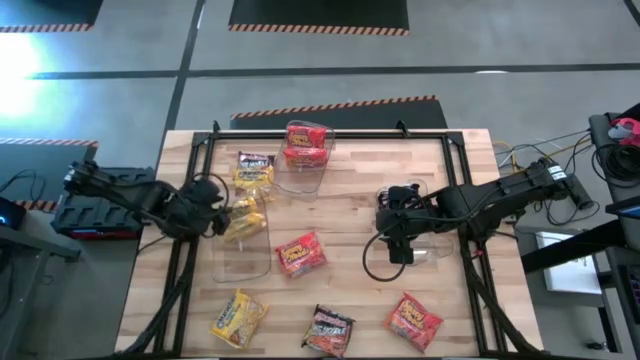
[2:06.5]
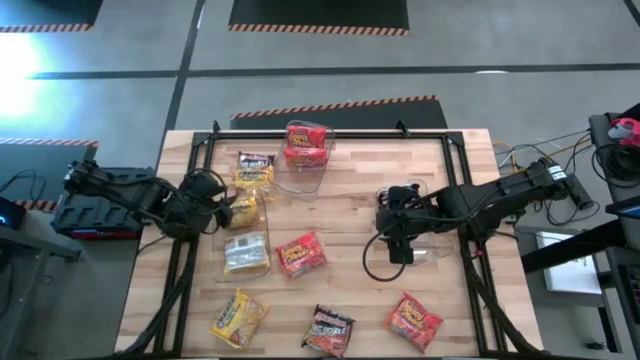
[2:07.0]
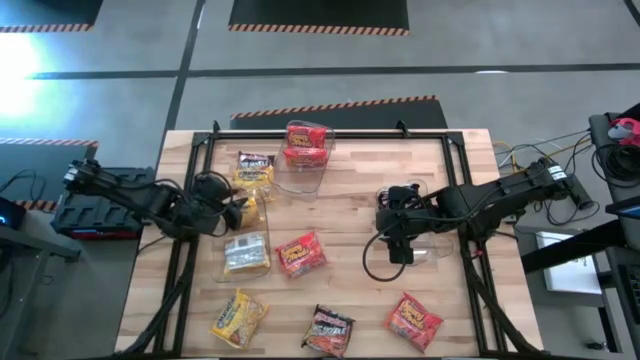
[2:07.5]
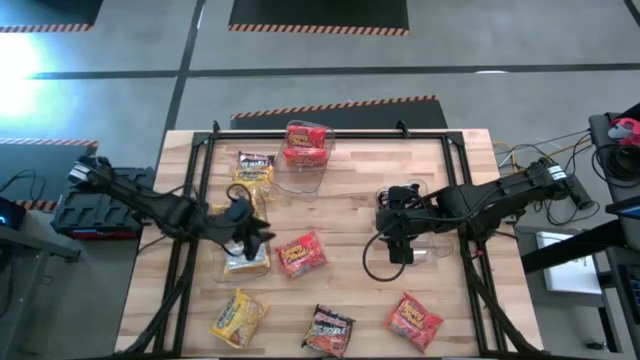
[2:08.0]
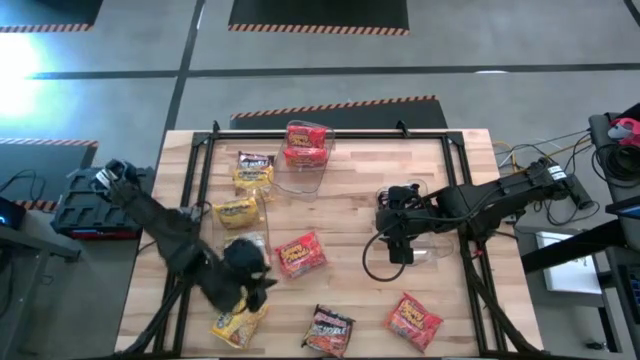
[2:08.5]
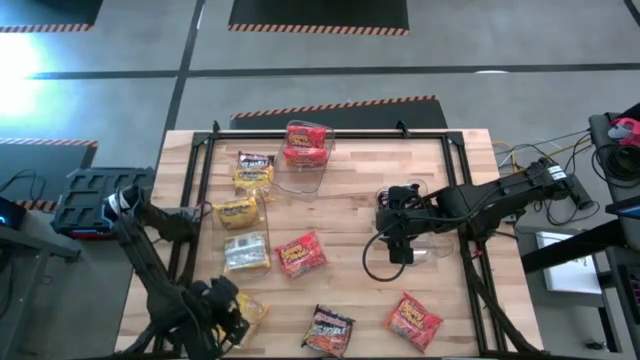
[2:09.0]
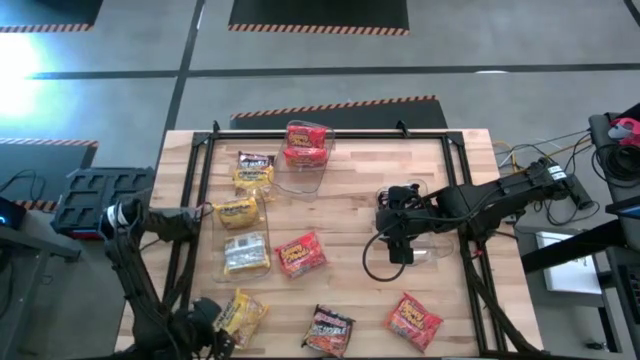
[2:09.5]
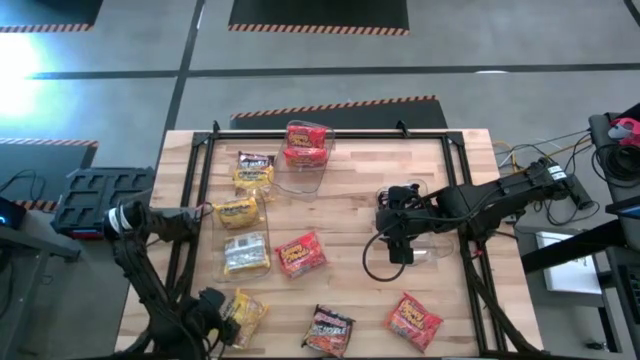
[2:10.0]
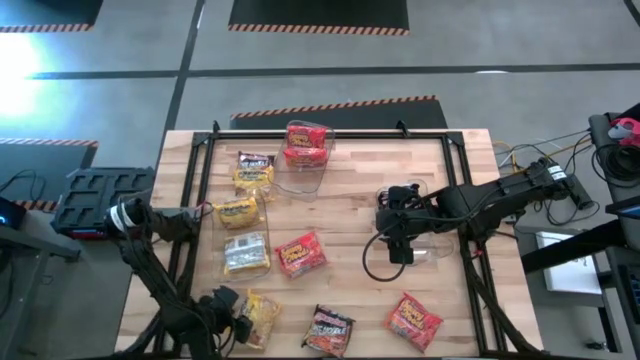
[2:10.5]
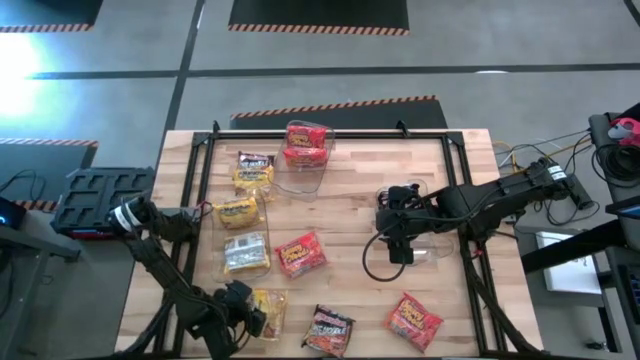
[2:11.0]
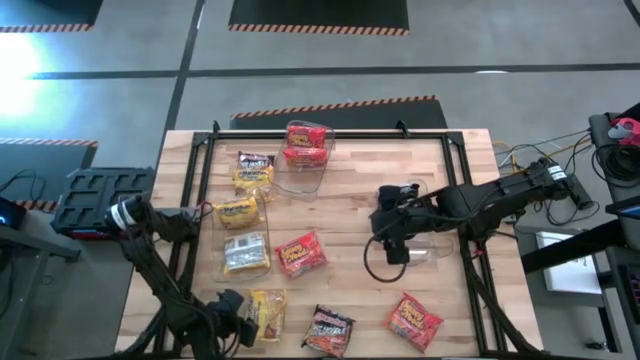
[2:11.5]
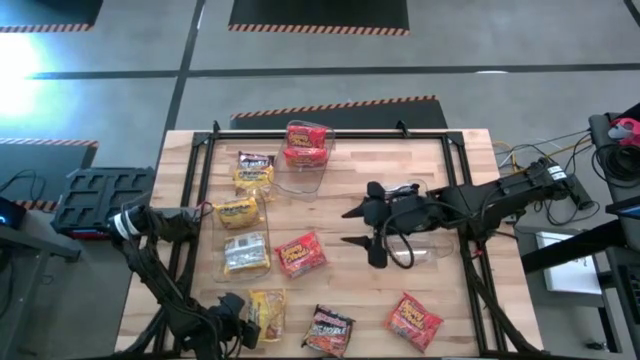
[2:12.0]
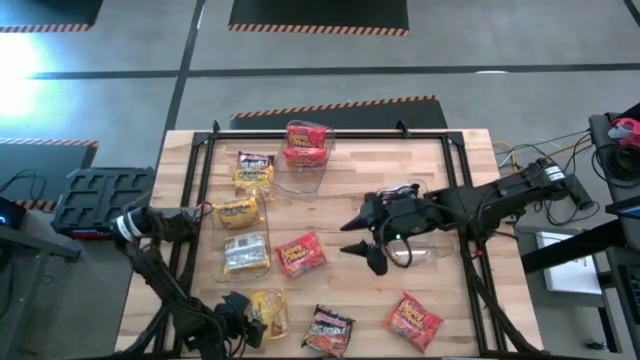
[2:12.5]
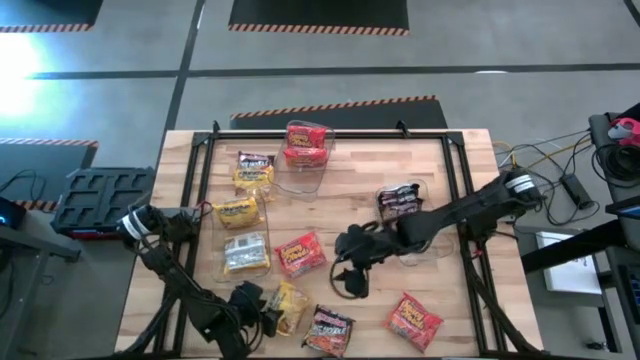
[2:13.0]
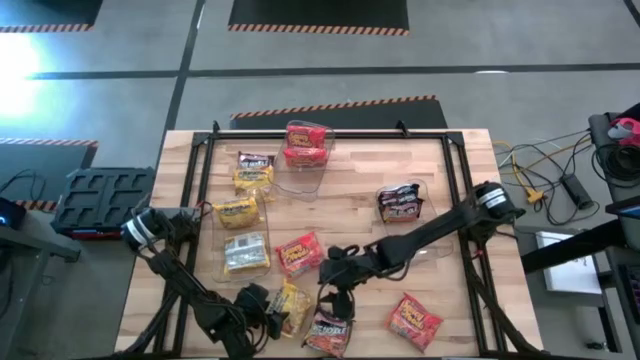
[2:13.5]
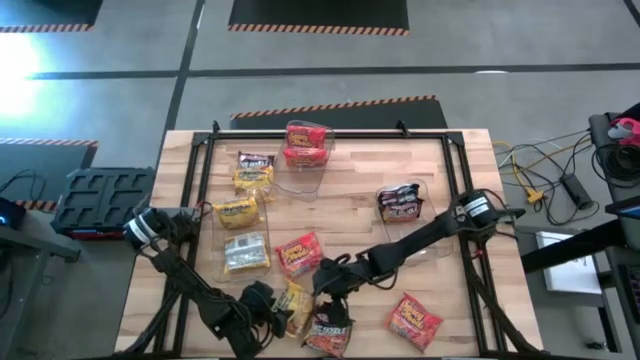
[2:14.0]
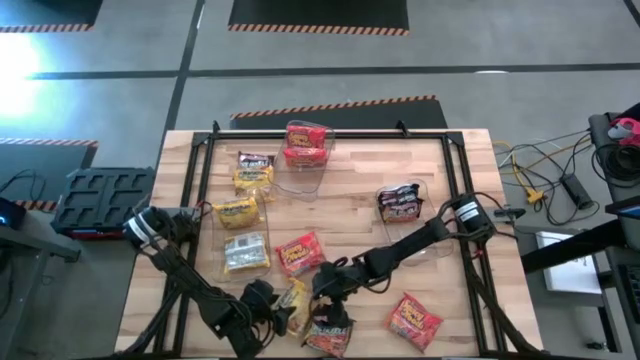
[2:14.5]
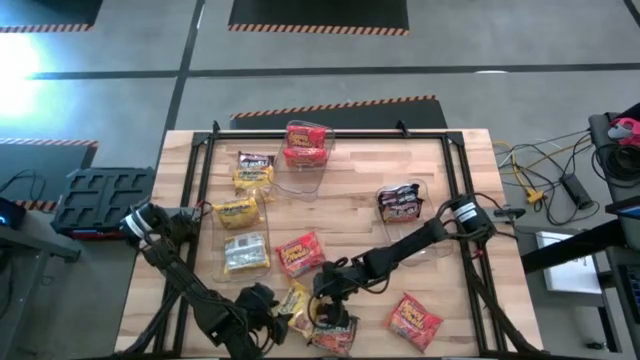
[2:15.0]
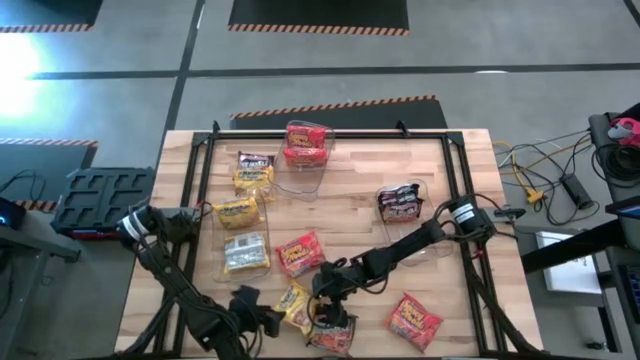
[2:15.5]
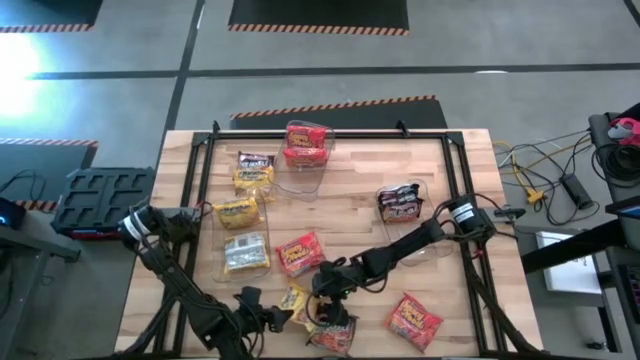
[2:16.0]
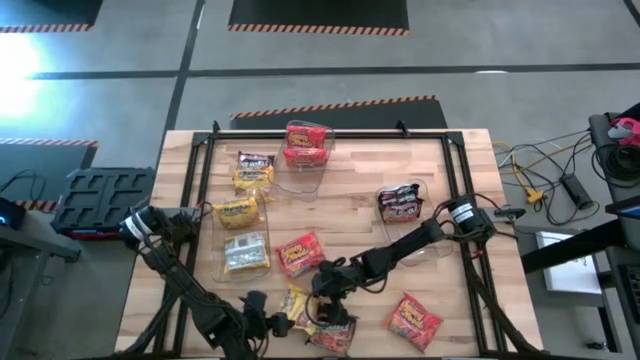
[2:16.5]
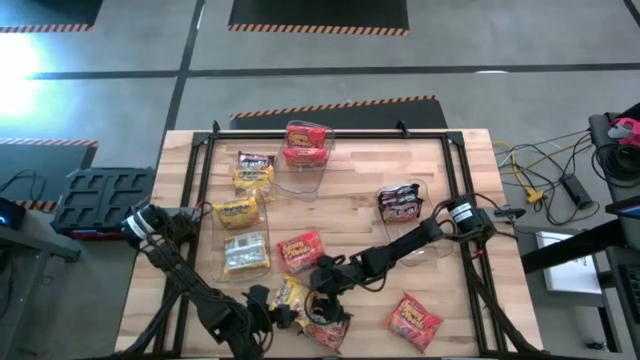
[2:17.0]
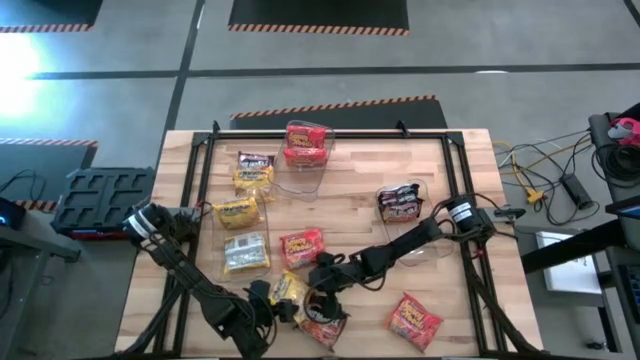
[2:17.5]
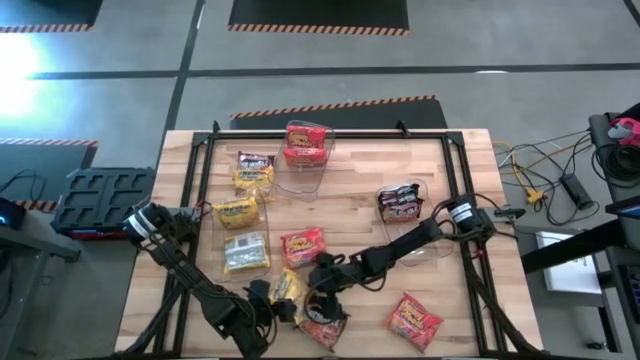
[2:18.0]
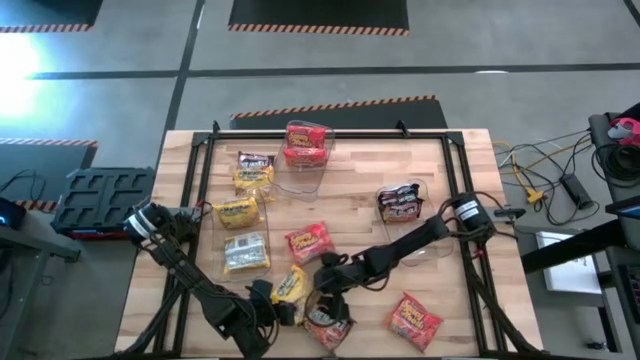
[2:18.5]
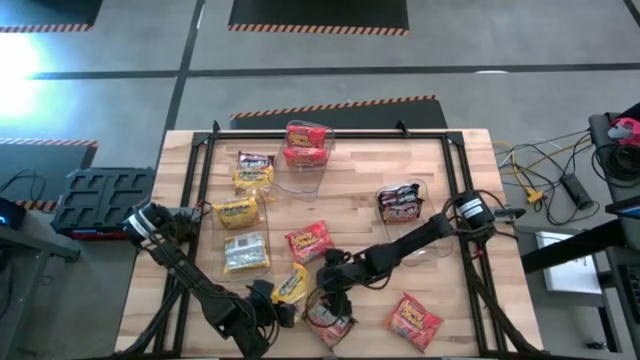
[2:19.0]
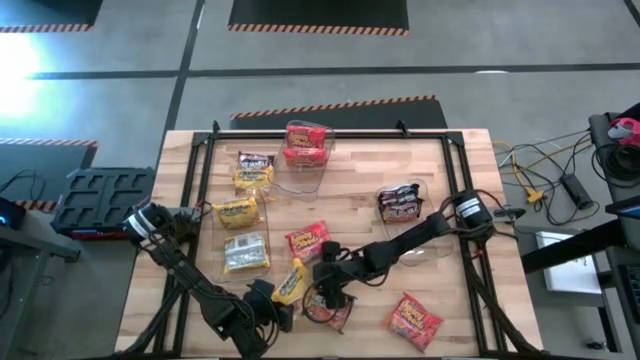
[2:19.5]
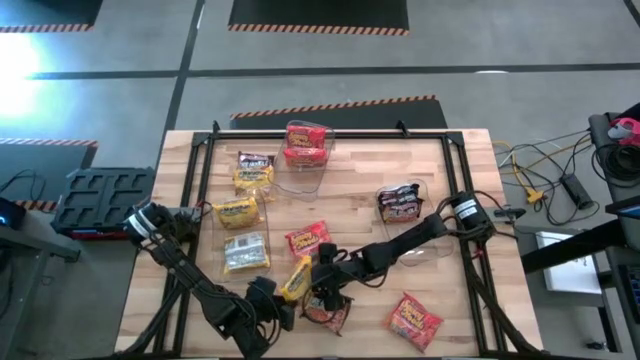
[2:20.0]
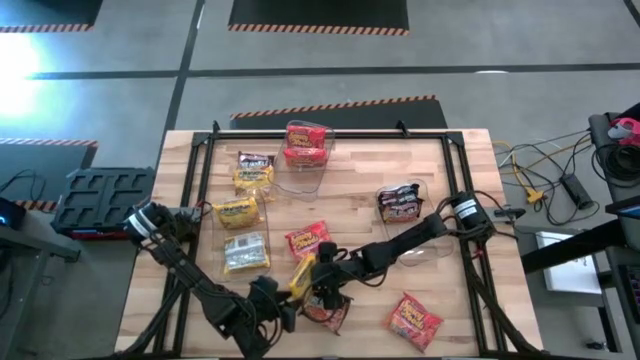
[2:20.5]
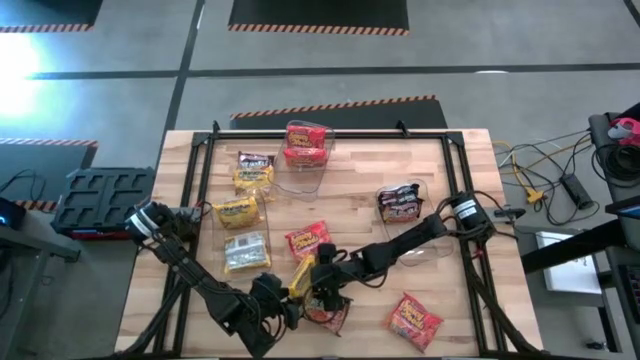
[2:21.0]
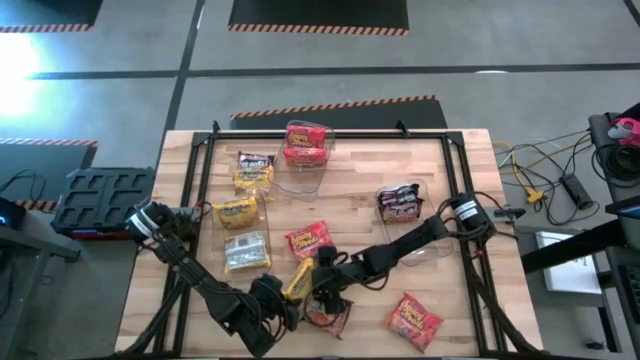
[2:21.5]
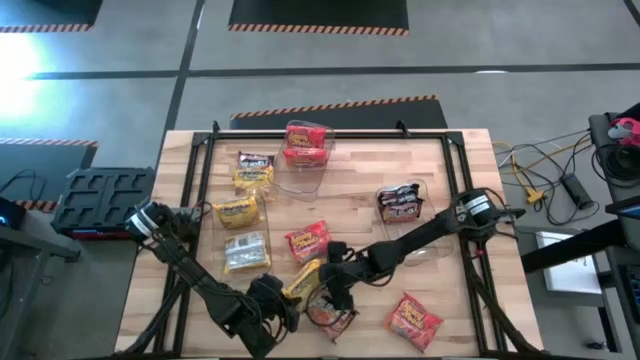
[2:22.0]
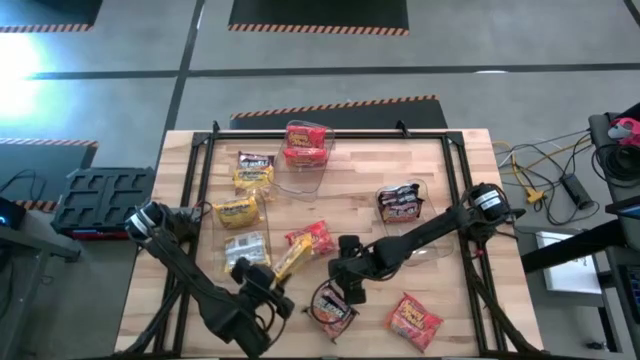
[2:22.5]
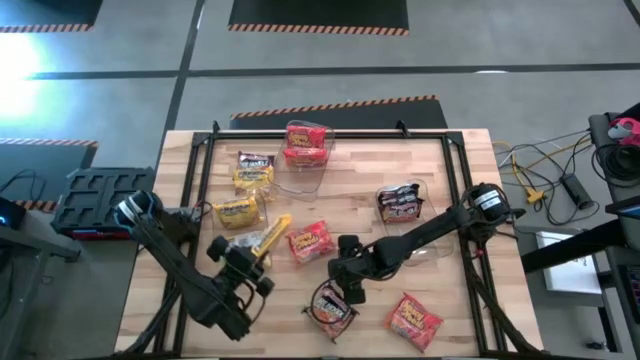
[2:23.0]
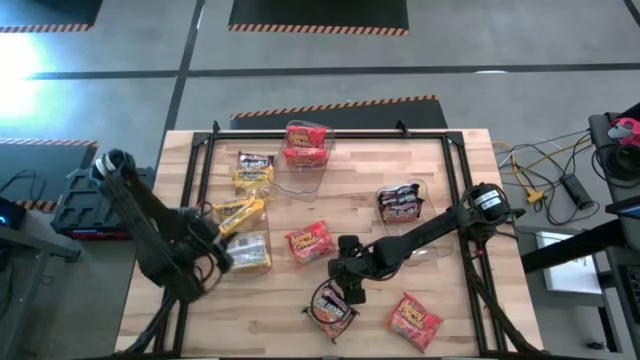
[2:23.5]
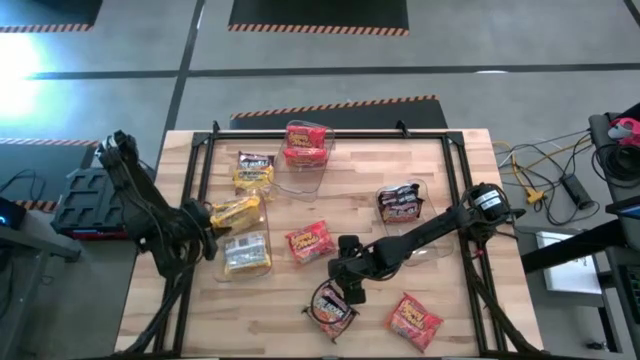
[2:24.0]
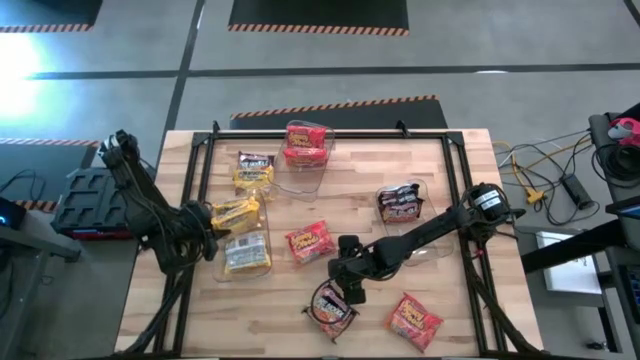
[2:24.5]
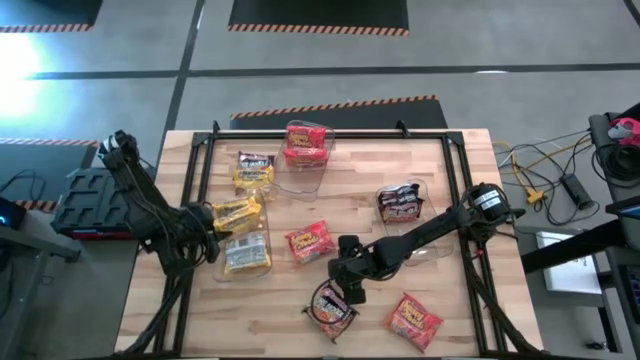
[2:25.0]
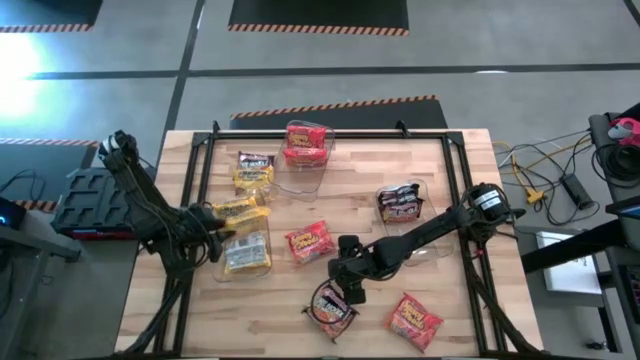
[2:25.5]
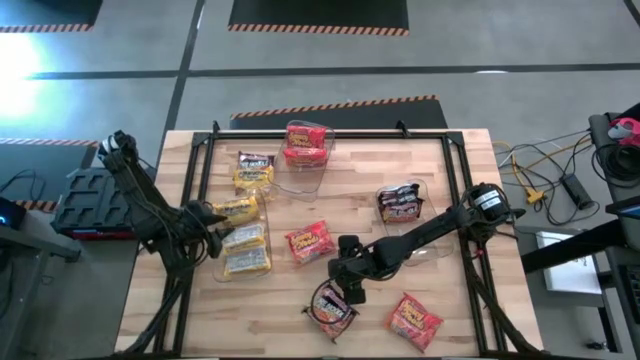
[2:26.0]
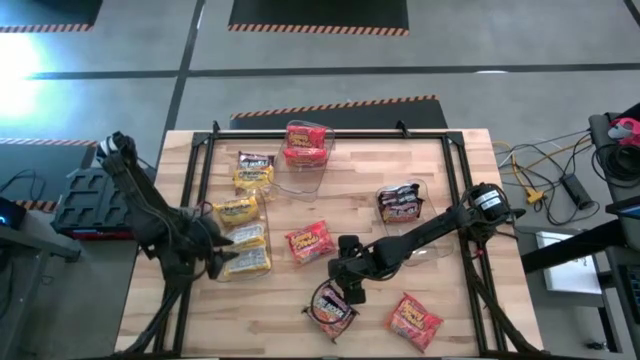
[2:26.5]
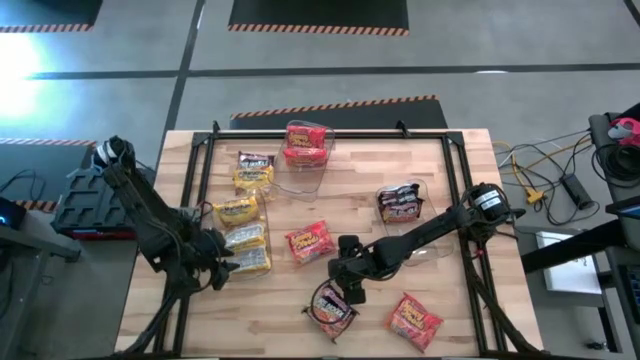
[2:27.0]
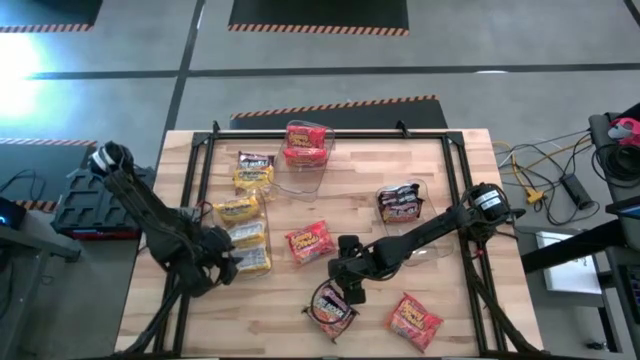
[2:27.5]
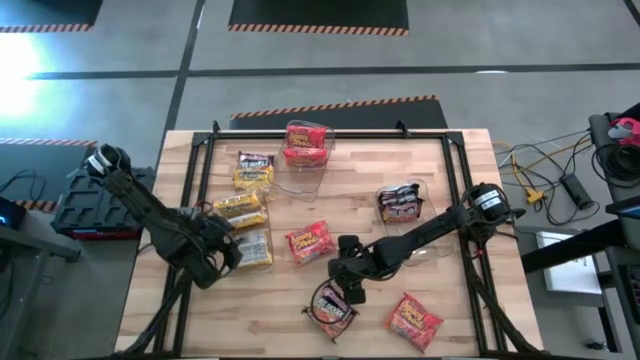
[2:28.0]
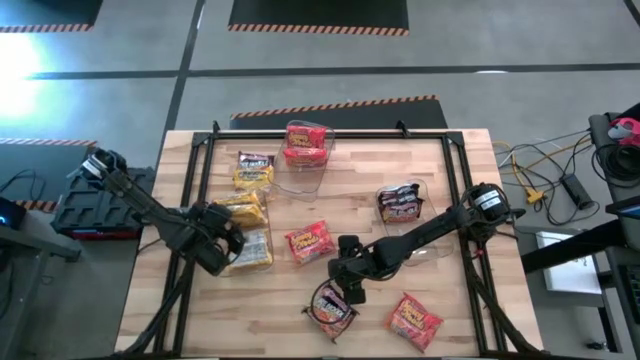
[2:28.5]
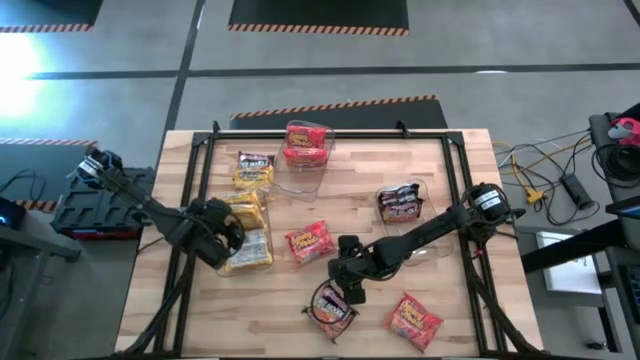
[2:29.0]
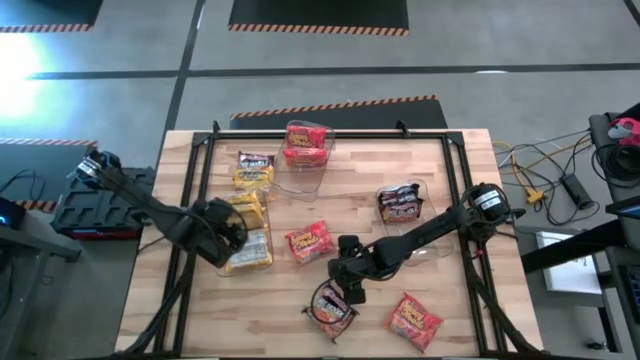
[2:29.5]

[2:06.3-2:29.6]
Task: Sort Maruchan noodles
Put the bottom yellow pack noodle into the bottom left transparent bin
